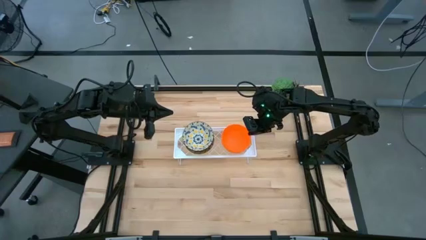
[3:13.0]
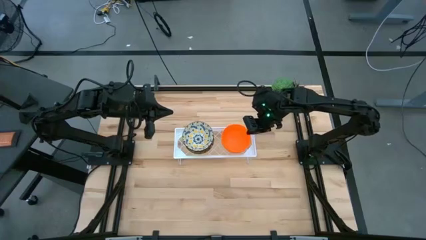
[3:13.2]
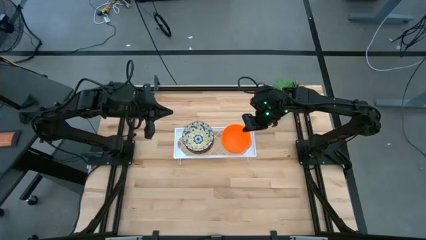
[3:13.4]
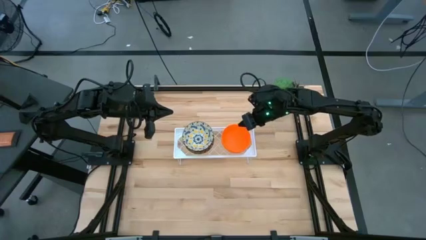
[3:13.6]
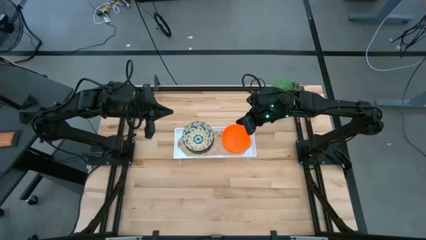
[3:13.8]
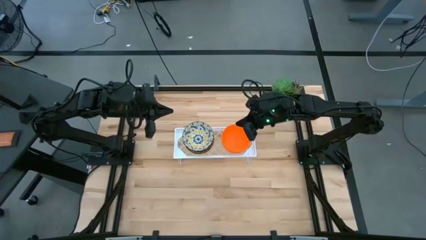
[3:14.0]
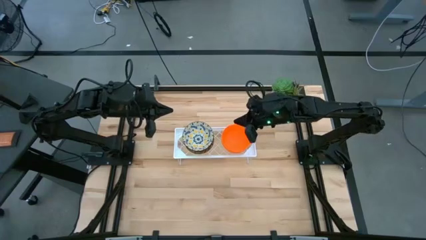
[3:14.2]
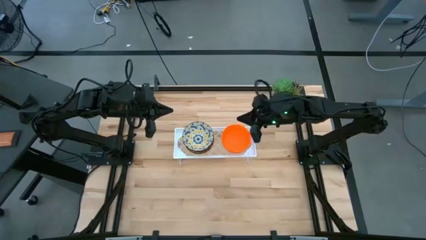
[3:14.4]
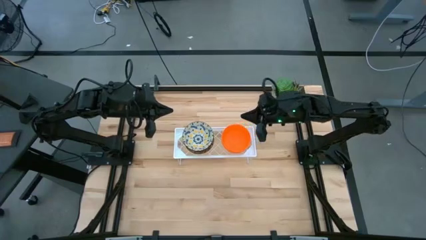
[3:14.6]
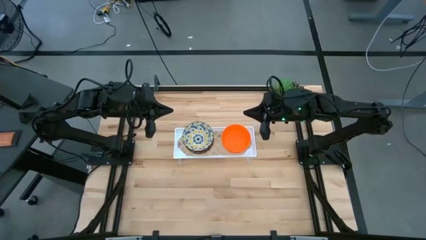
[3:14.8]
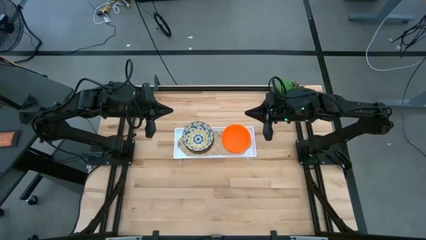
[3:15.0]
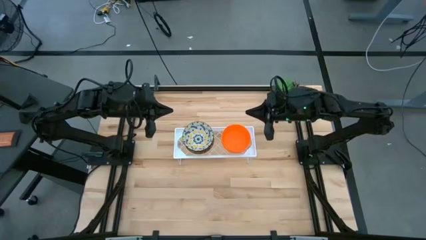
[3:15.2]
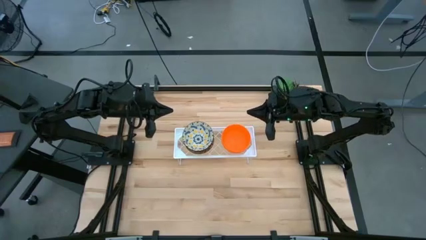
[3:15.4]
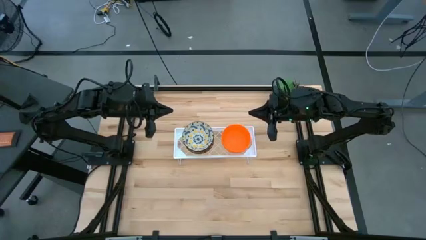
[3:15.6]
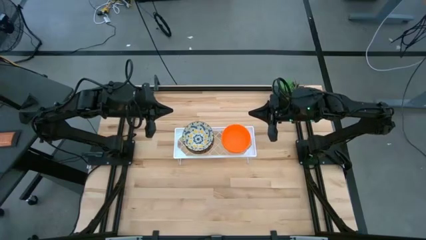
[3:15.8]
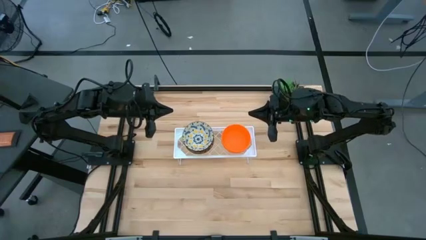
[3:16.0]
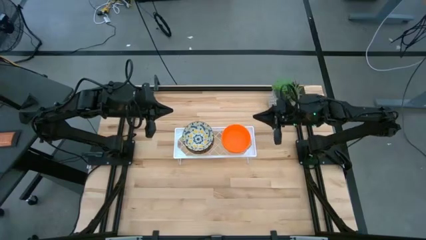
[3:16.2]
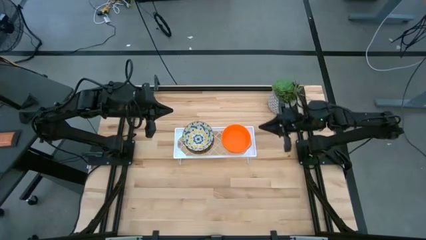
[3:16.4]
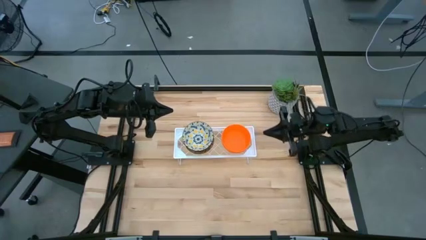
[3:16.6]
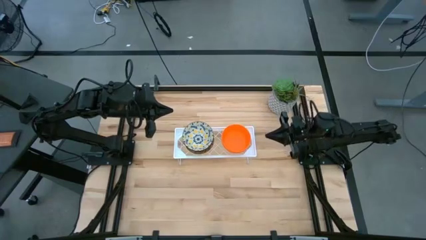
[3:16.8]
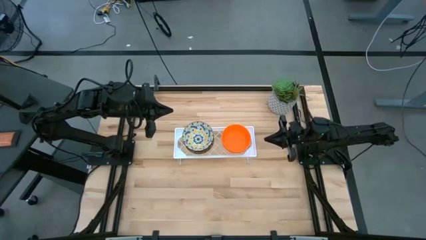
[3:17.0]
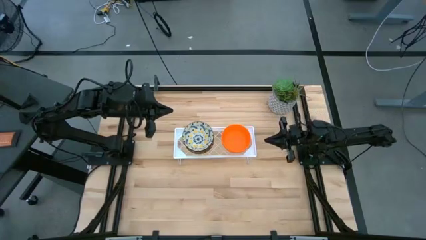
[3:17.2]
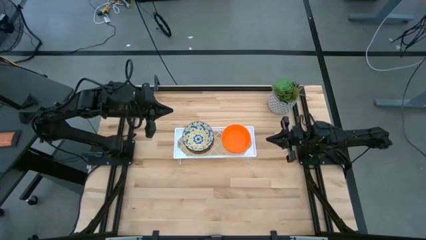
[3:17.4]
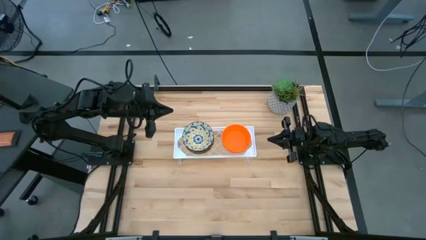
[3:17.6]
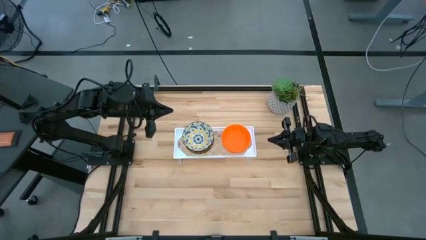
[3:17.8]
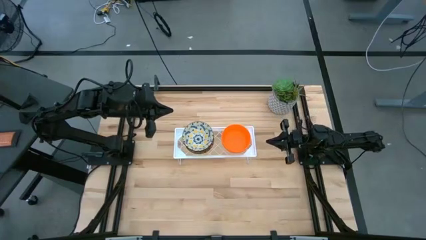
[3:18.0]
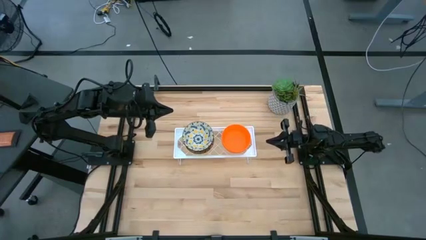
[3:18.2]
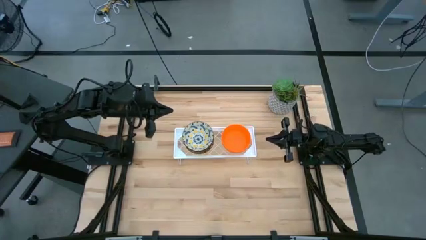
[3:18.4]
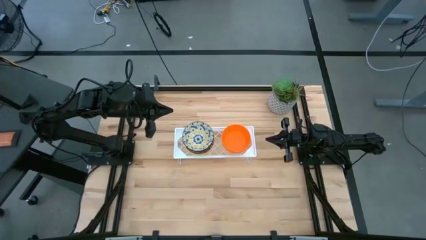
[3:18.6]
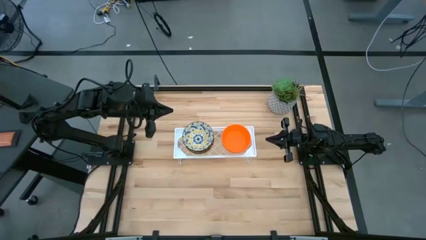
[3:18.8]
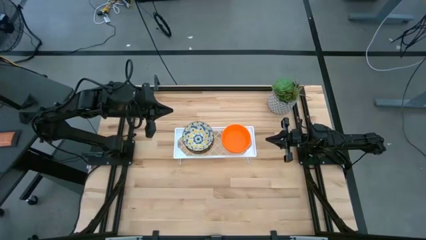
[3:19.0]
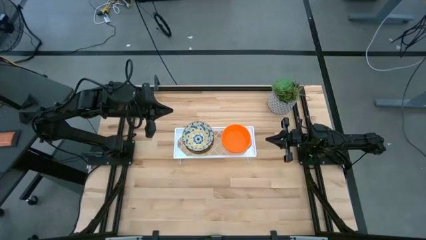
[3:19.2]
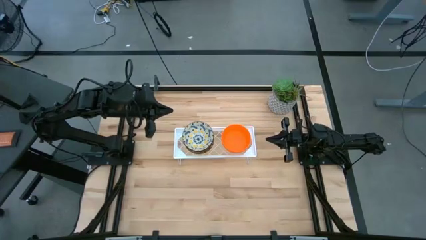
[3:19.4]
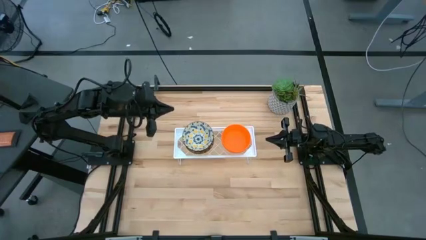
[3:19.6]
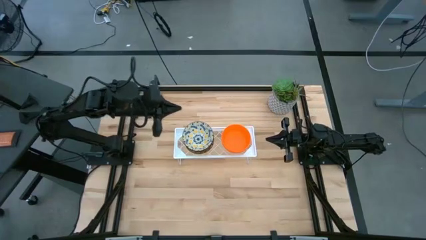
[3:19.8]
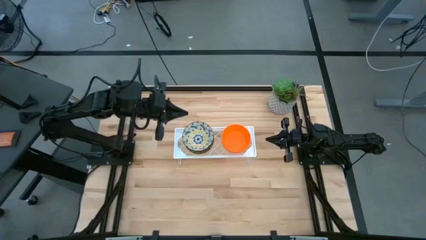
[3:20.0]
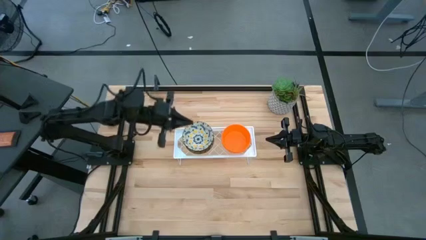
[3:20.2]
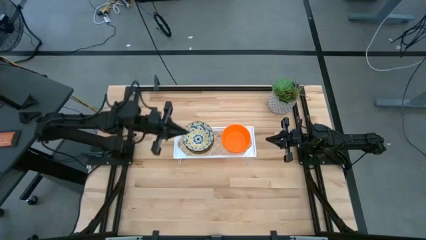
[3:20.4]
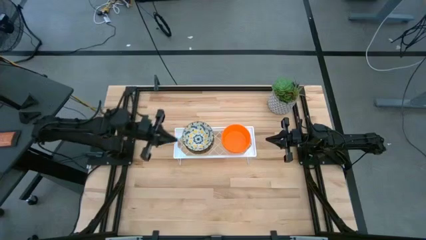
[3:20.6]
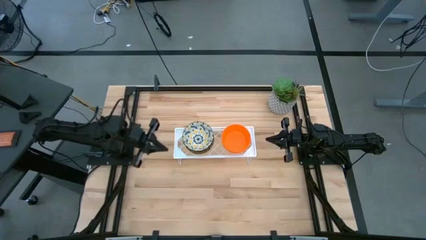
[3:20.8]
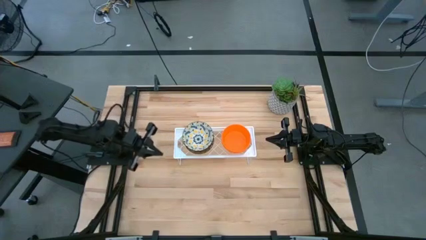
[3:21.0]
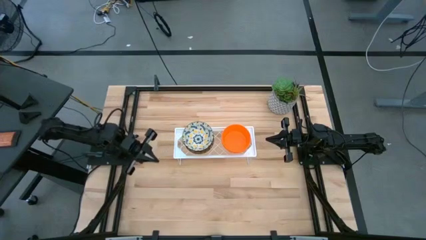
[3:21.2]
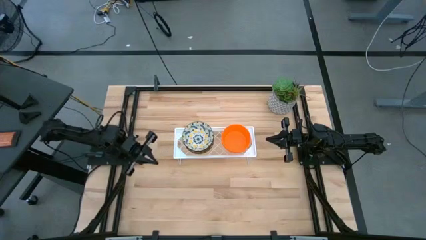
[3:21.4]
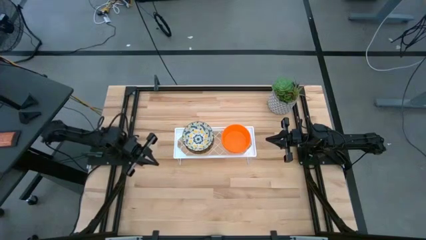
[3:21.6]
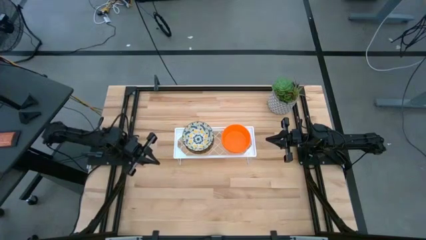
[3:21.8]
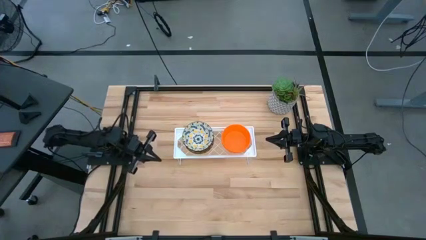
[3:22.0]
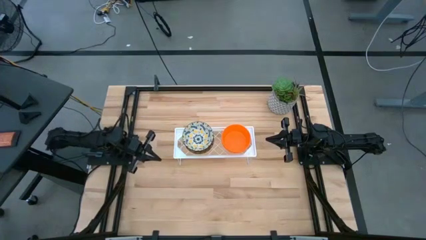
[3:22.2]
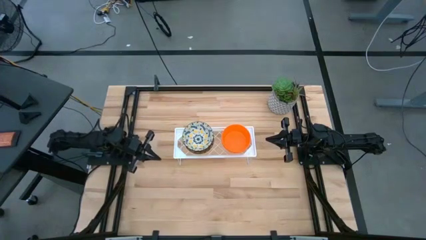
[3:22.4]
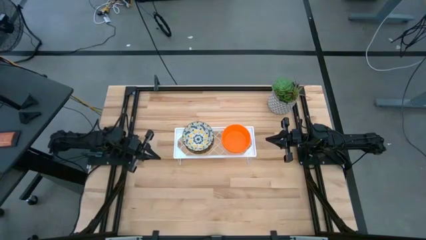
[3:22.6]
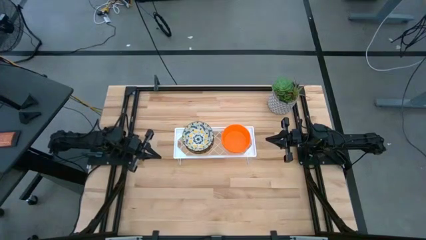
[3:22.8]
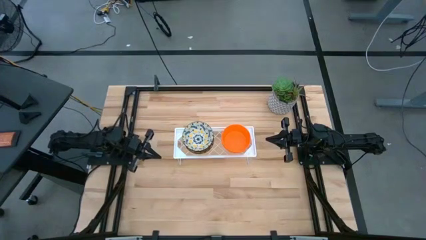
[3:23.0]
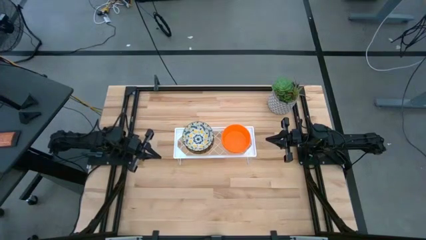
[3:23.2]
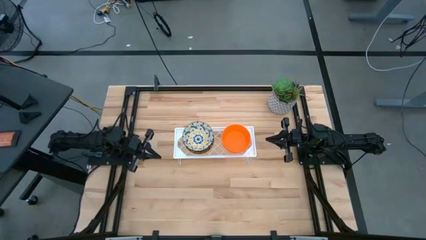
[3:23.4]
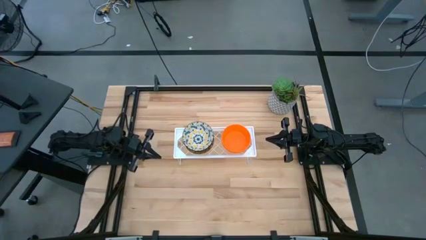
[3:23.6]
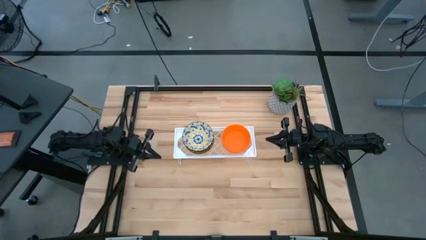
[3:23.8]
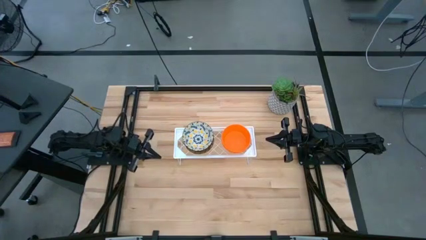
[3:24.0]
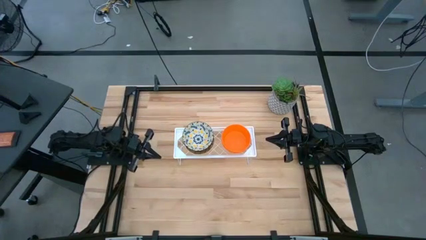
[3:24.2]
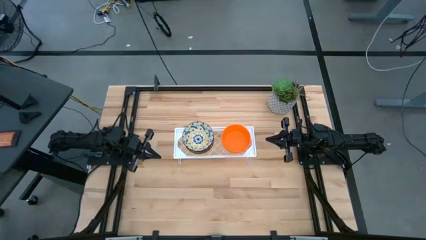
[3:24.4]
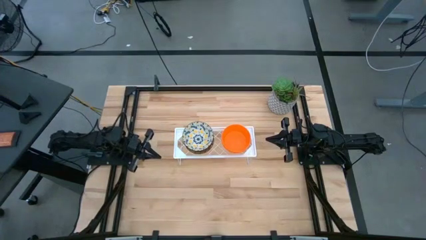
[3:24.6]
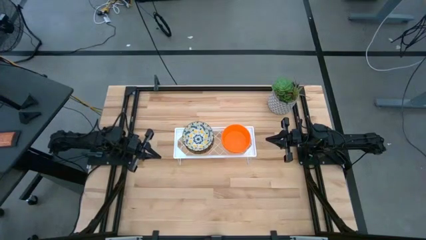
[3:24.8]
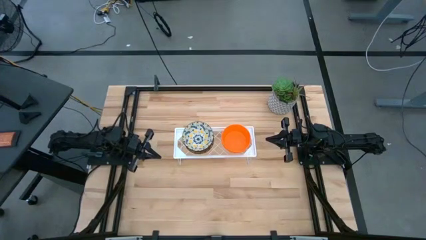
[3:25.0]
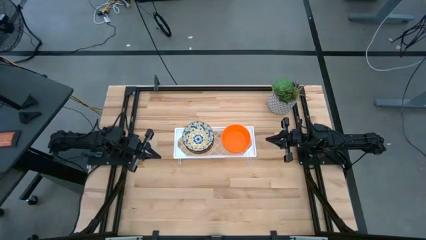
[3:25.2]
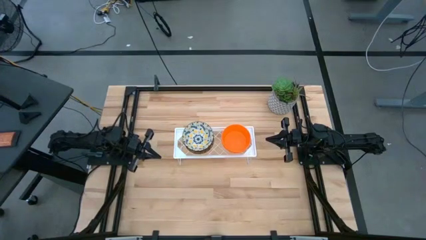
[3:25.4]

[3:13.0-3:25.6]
Task: Pick & Place Mini bowls
Return to Home Position
